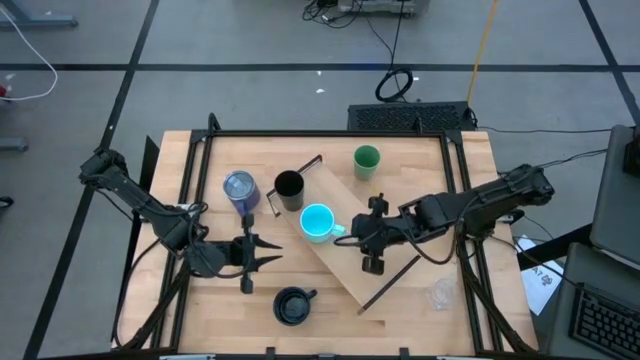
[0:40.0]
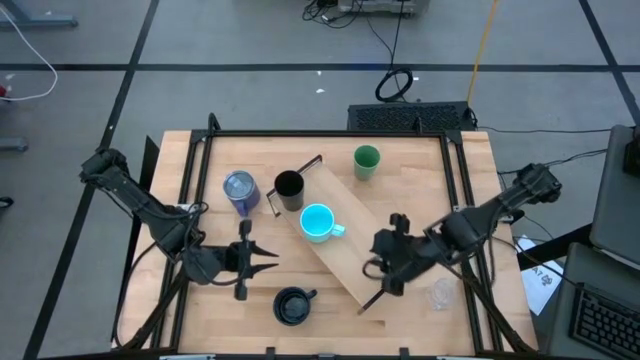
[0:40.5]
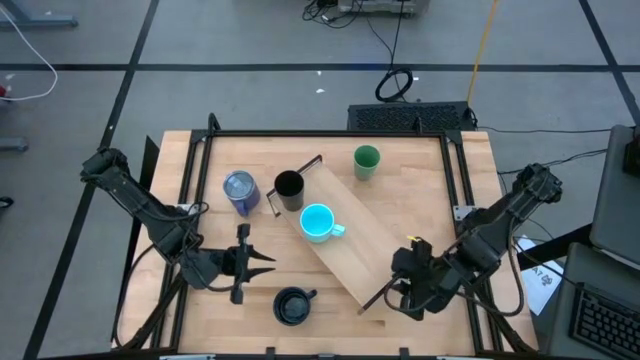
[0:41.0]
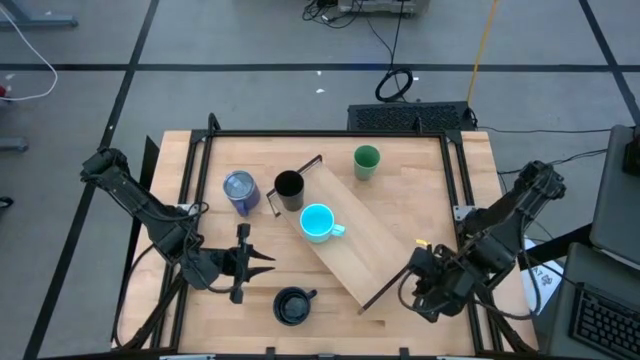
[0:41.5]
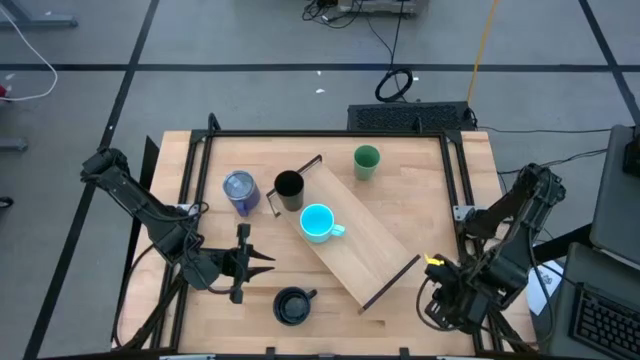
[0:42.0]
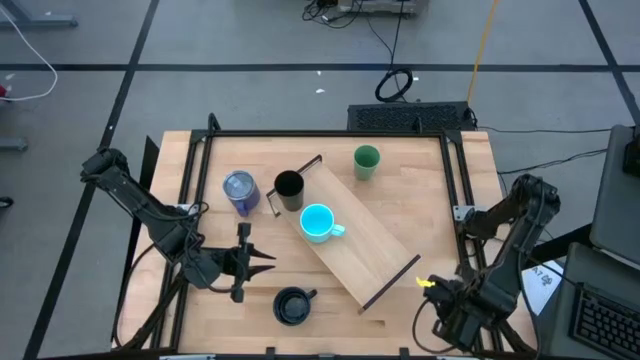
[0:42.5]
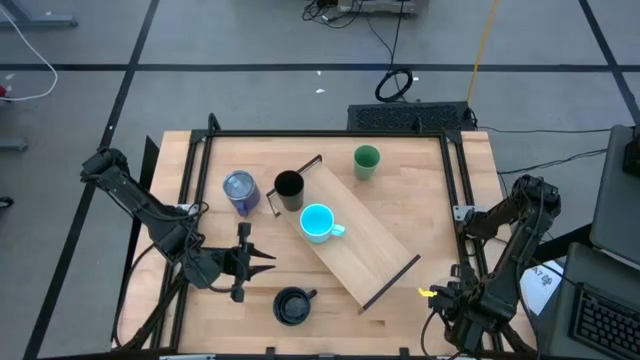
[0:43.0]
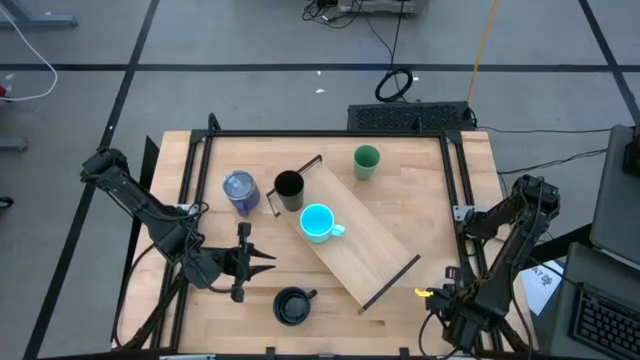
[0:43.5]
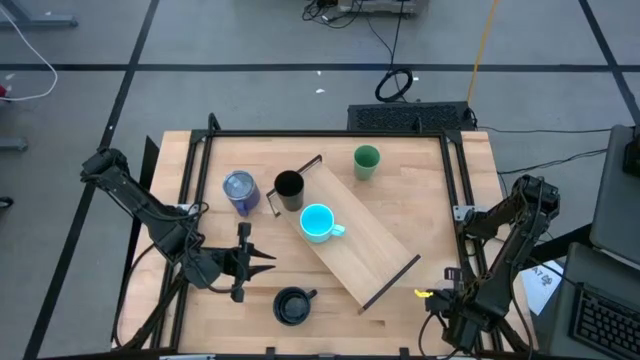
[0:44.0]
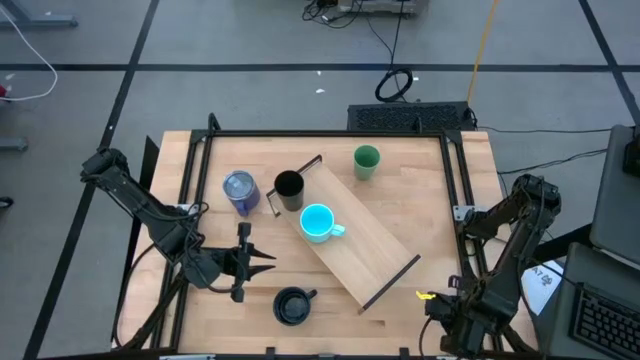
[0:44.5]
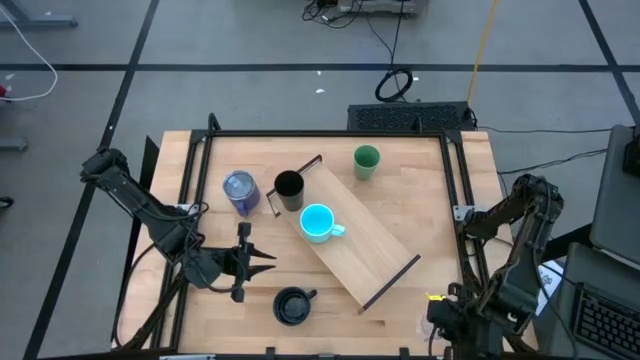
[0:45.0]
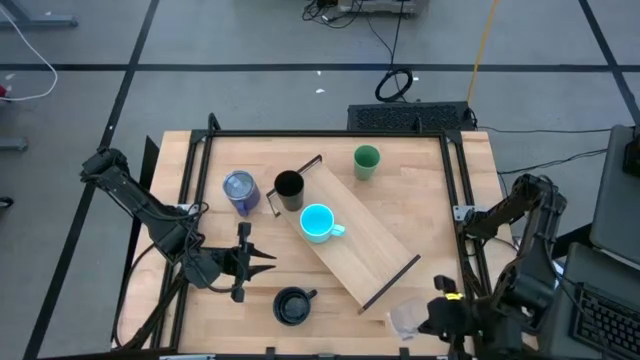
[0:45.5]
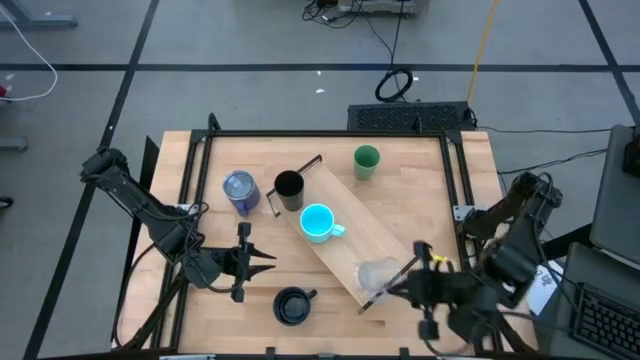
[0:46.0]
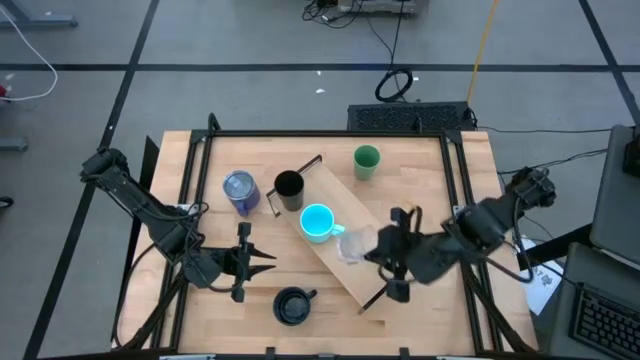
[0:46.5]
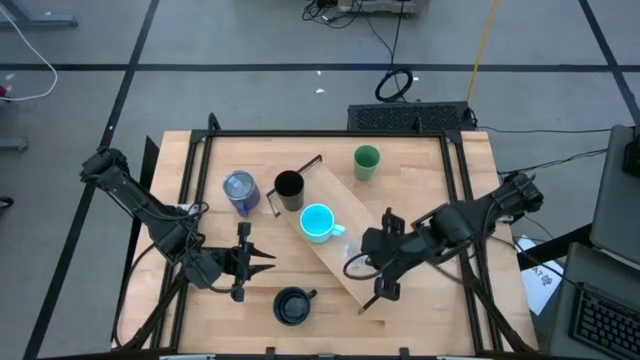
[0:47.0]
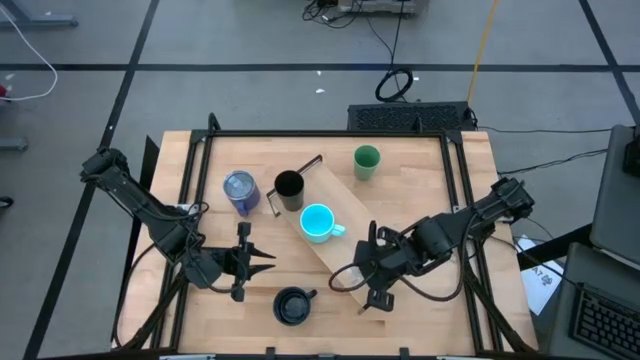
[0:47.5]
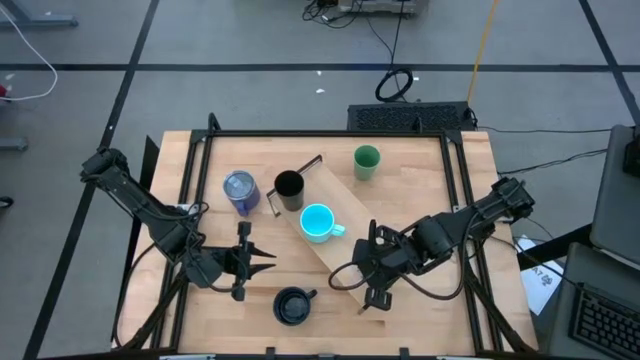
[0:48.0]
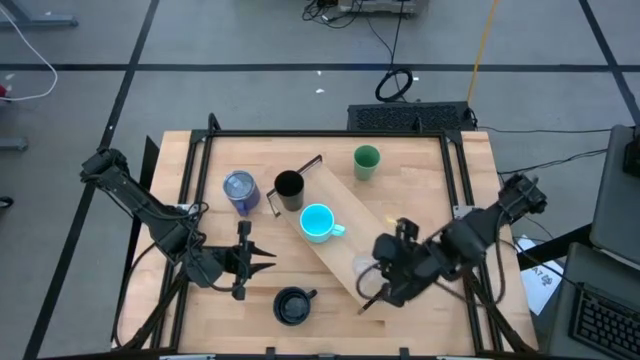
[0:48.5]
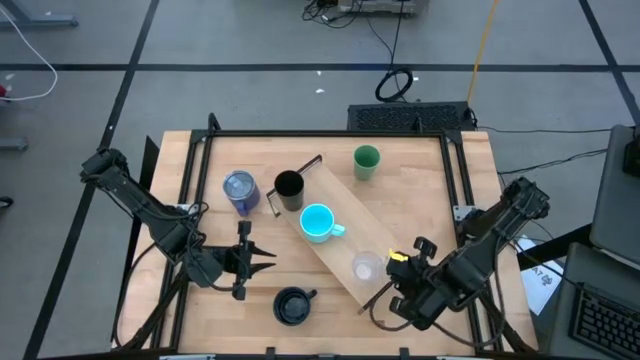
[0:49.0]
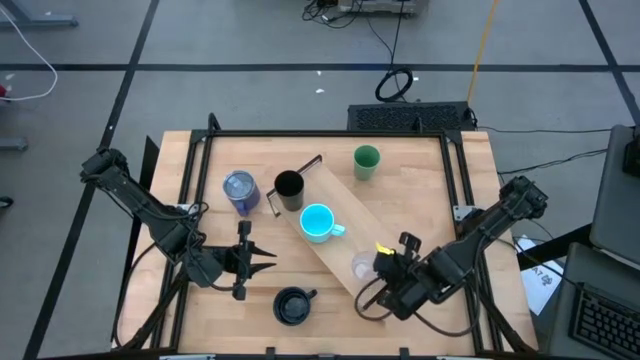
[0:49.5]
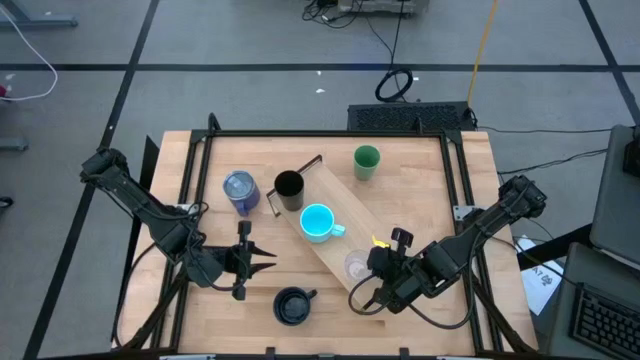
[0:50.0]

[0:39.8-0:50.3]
Task: Stack small to large cups/mugs on shelf
Put the transparent mug on the shelf

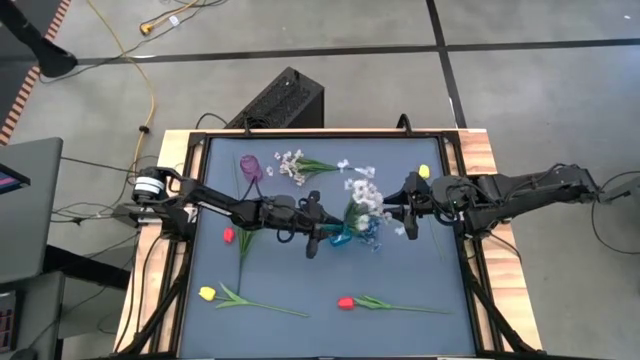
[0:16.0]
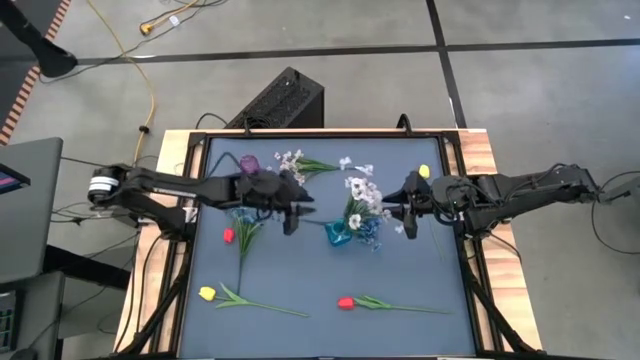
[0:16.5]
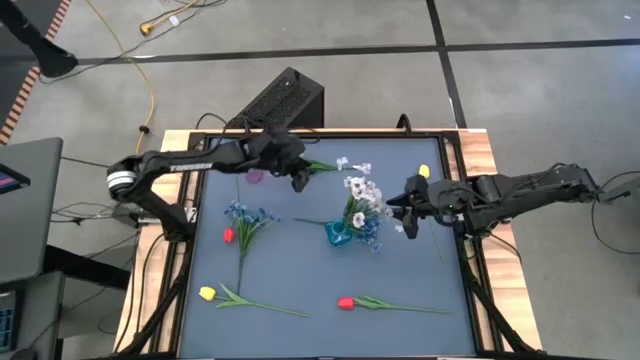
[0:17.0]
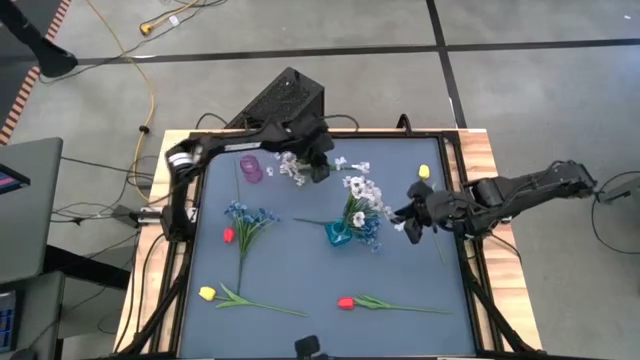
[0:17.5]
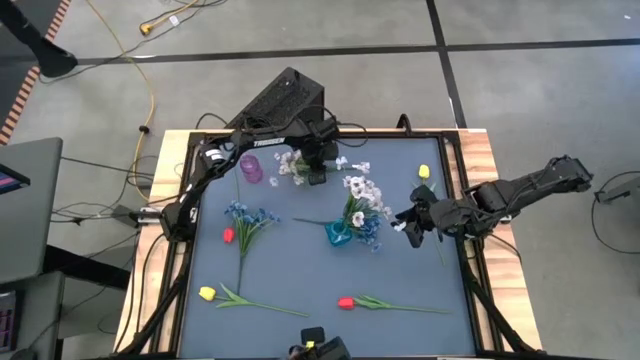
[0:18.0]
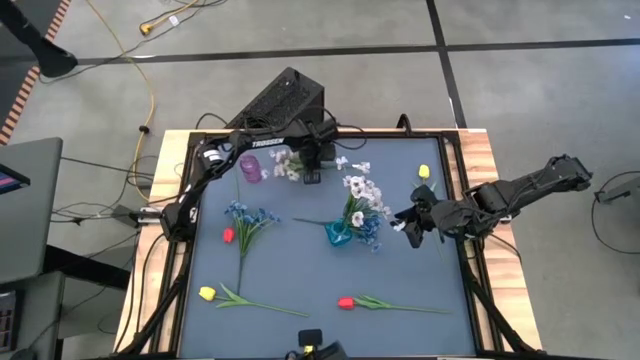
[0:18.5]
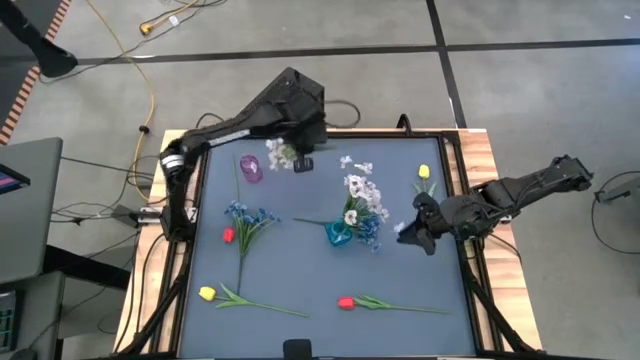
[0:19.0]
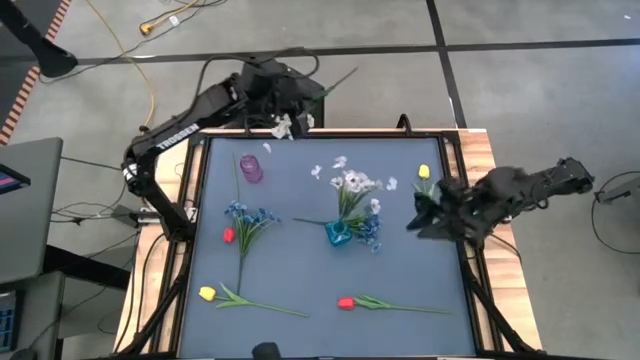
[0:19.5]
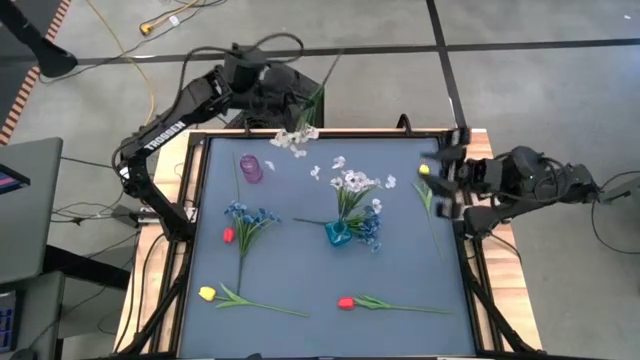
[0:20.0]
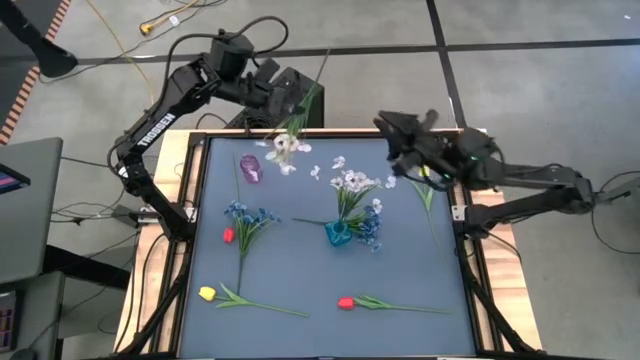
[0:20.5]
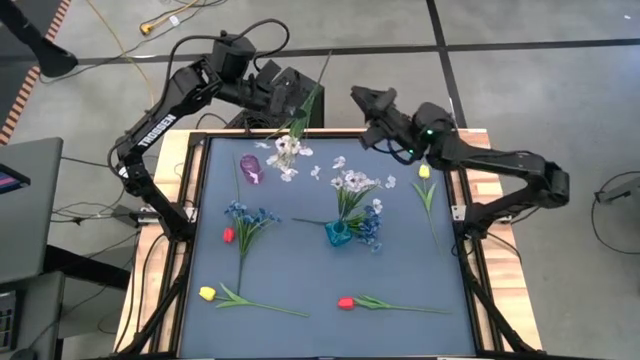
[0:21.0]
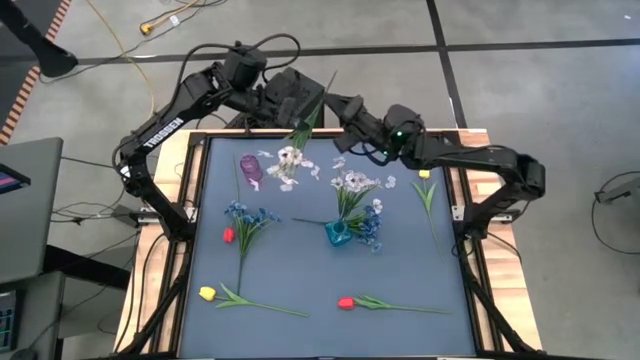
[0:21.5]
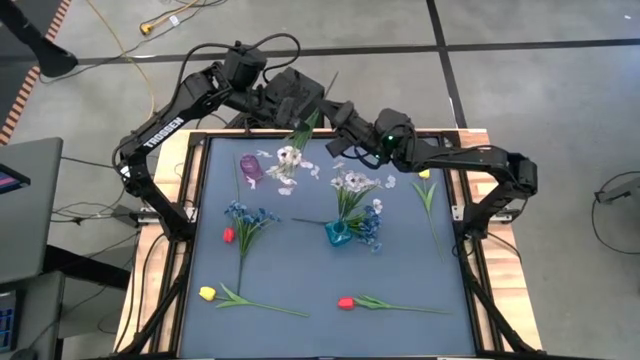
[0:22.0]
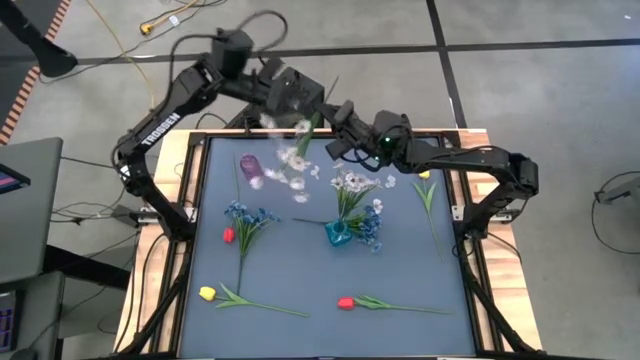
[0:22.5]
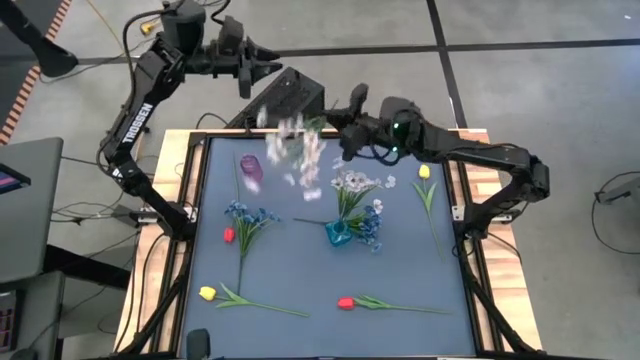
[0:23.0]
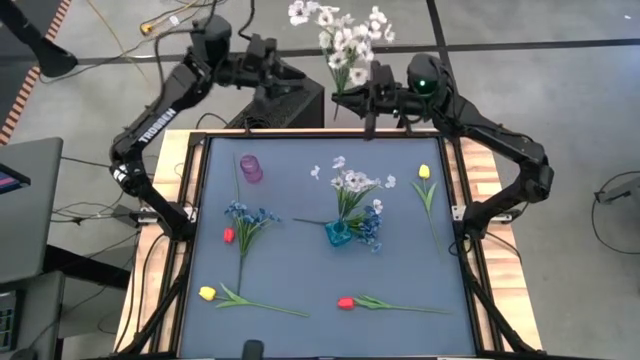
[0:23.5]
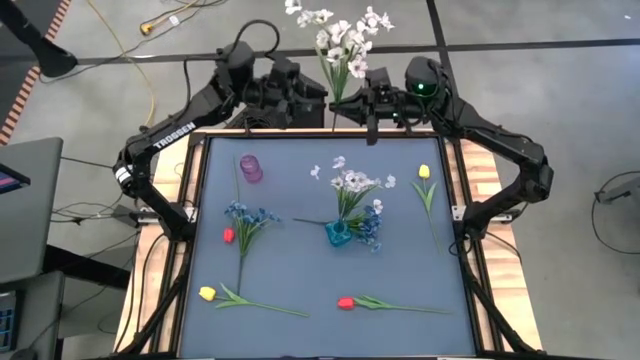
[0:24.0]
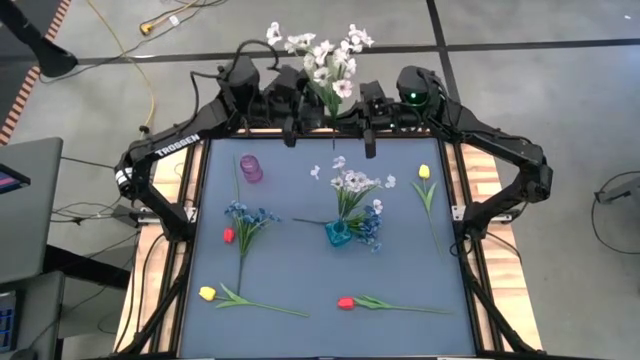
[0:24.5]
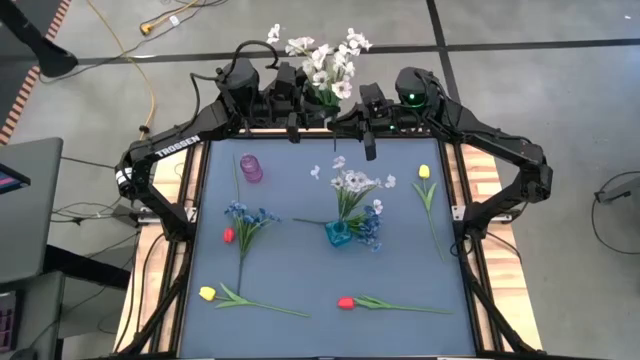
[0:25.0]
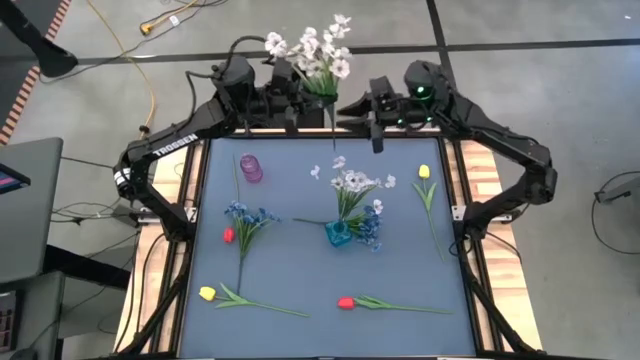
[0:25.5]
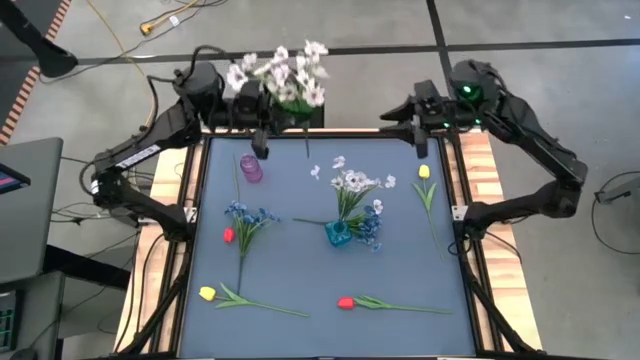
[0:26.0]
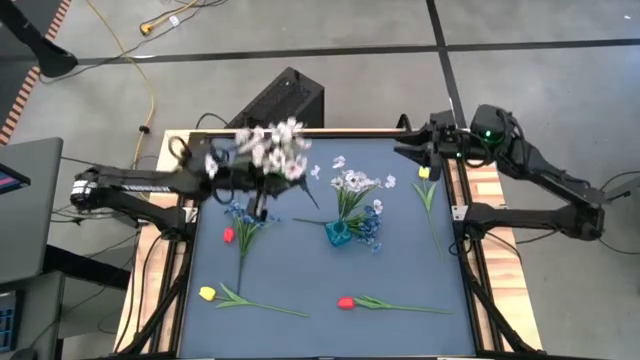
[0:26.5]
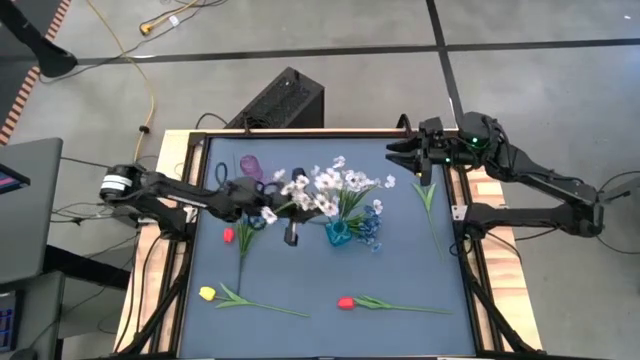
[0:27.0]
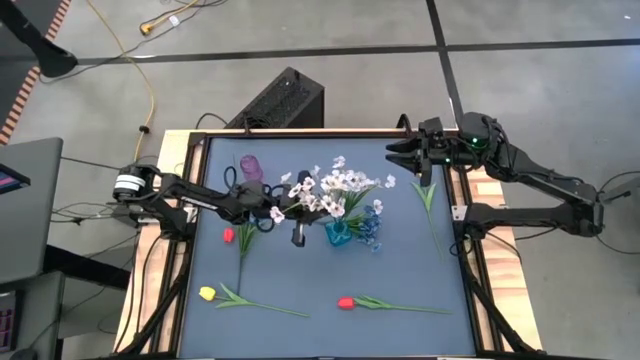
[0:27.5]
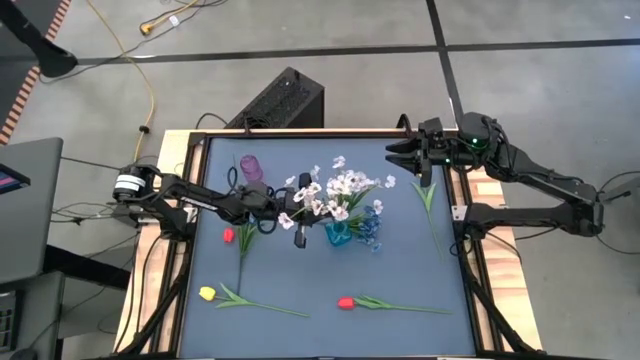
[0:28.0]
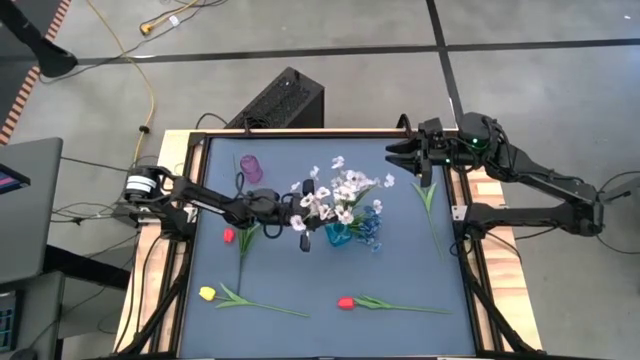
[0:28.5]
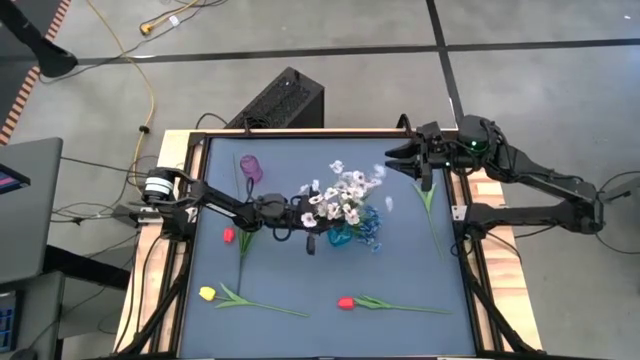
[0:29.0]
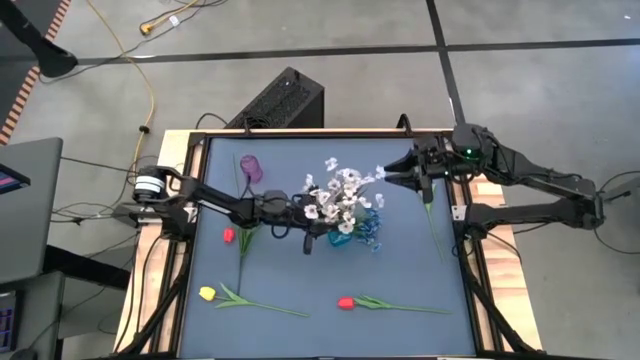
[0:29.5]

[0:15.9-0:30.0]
Task: Sort flowers into vase by color
Put the top white flower into the blue vase
